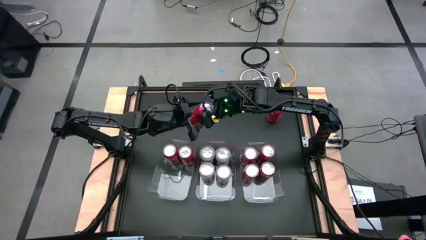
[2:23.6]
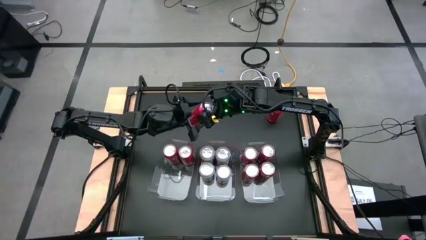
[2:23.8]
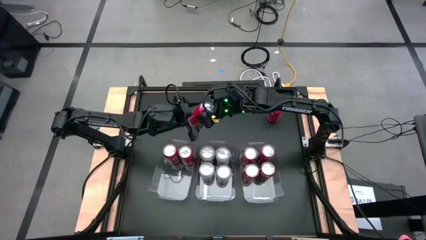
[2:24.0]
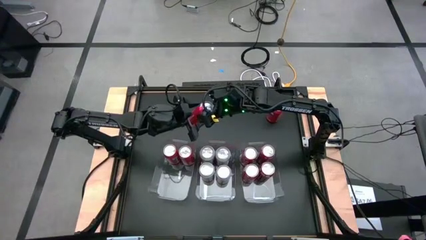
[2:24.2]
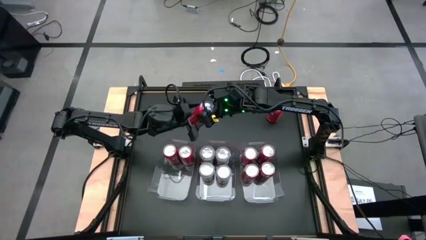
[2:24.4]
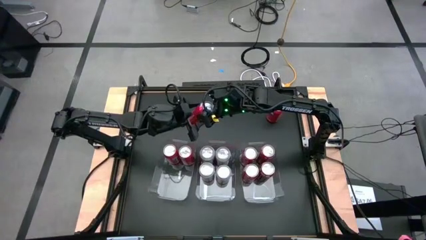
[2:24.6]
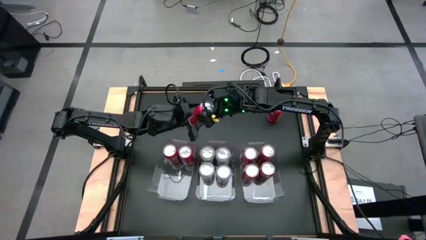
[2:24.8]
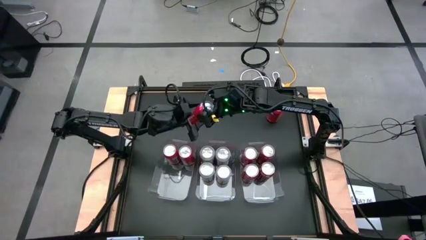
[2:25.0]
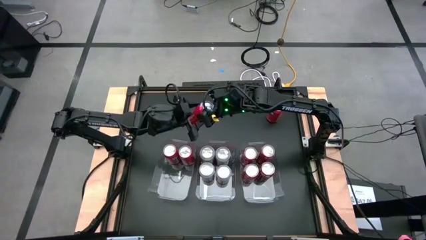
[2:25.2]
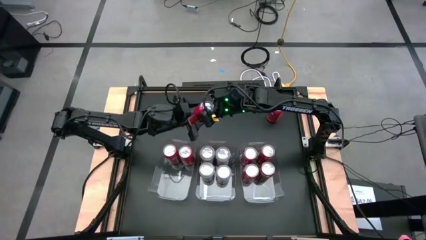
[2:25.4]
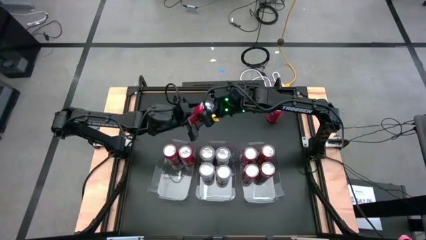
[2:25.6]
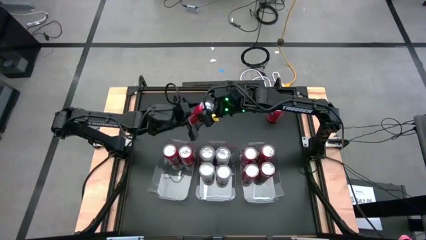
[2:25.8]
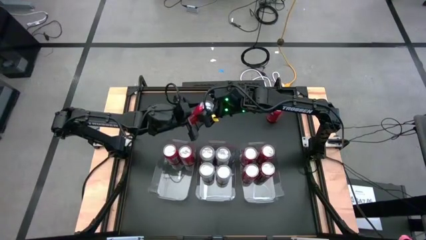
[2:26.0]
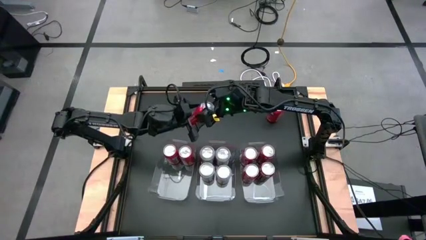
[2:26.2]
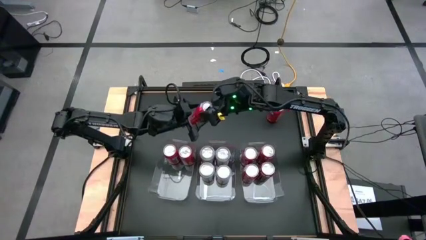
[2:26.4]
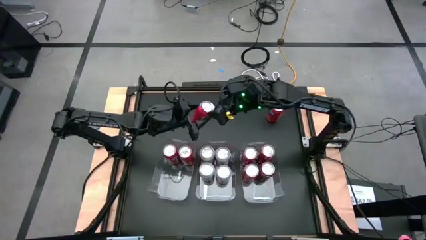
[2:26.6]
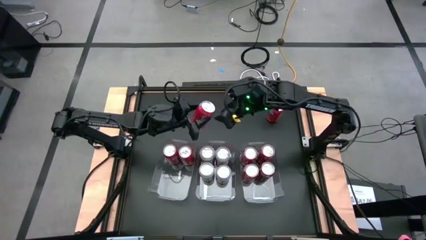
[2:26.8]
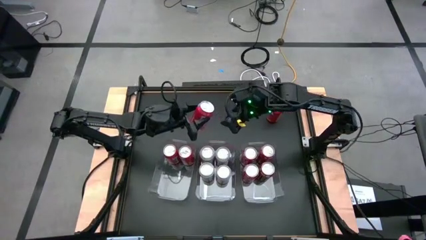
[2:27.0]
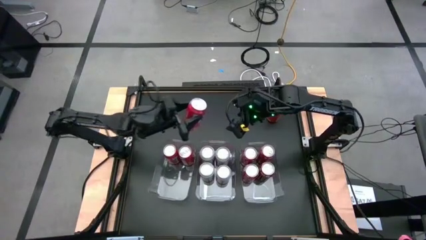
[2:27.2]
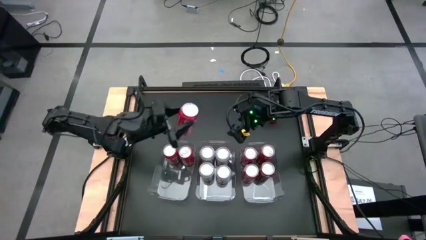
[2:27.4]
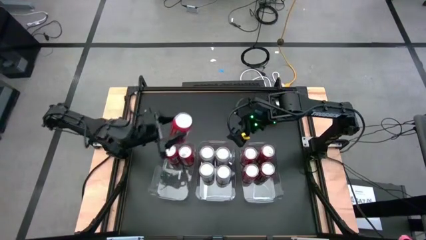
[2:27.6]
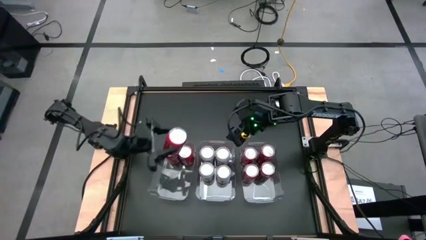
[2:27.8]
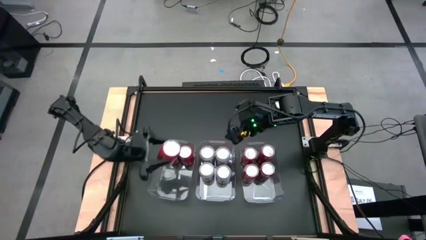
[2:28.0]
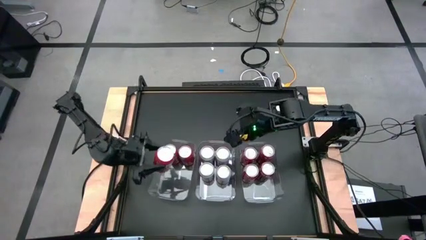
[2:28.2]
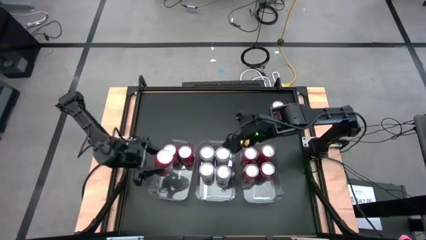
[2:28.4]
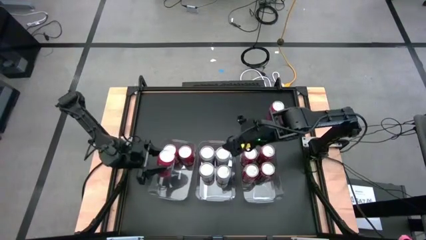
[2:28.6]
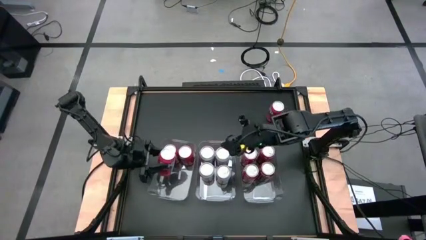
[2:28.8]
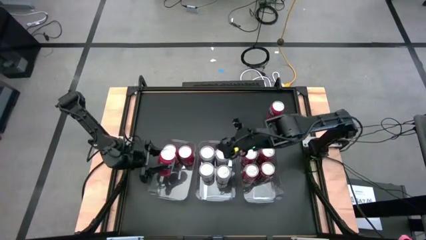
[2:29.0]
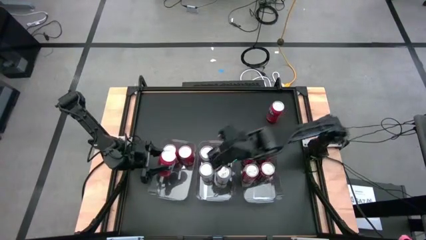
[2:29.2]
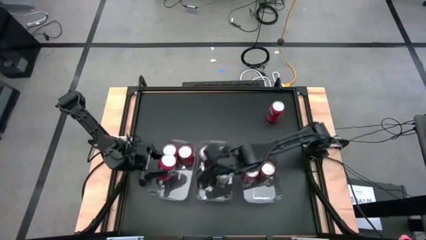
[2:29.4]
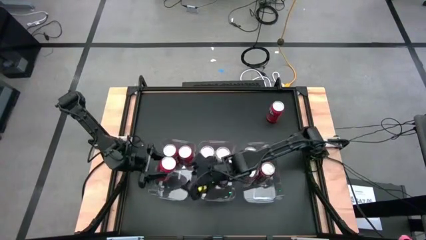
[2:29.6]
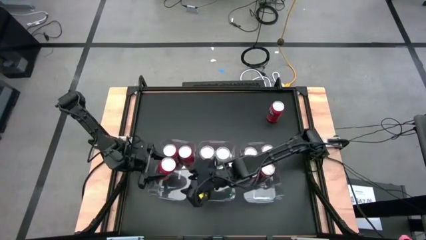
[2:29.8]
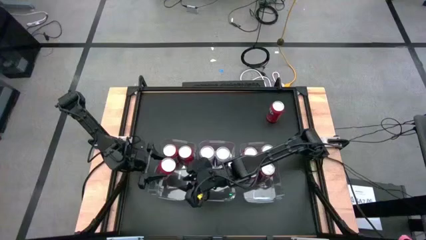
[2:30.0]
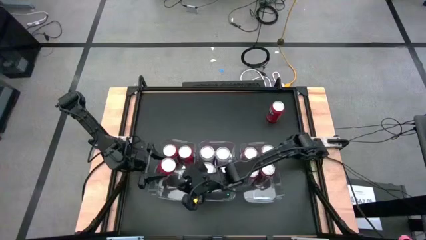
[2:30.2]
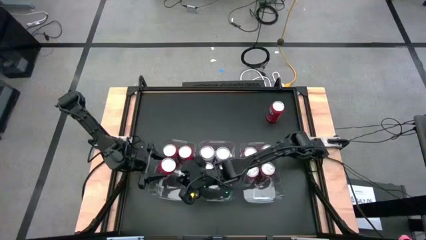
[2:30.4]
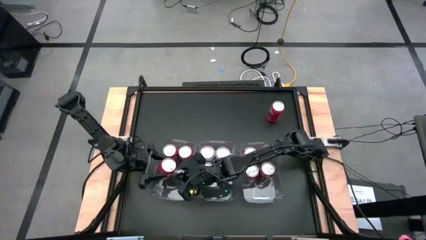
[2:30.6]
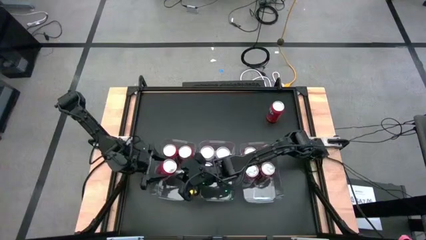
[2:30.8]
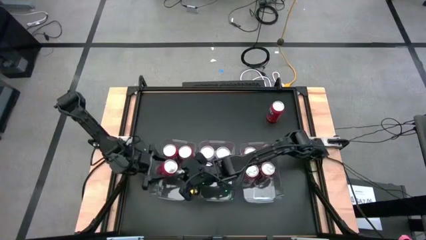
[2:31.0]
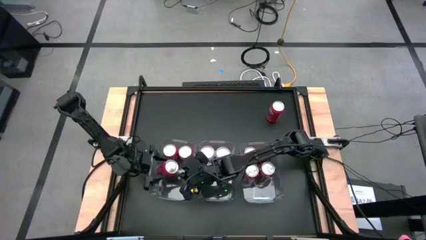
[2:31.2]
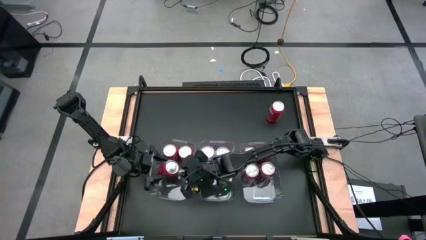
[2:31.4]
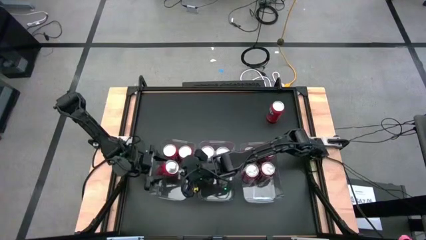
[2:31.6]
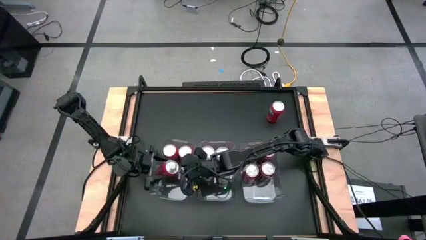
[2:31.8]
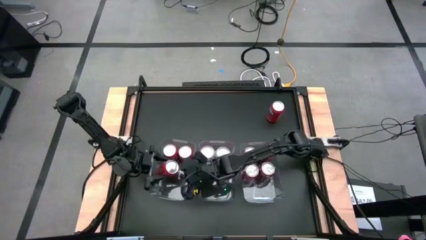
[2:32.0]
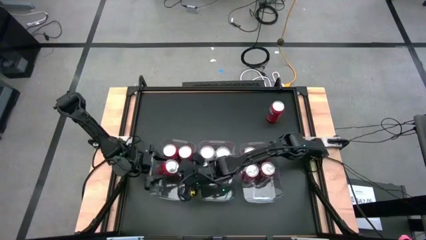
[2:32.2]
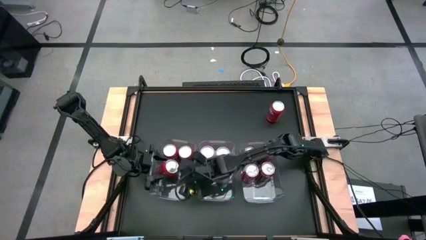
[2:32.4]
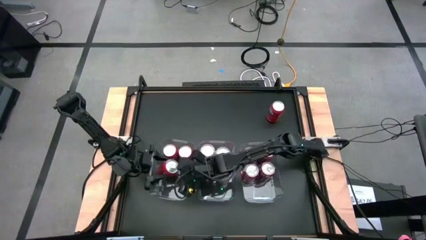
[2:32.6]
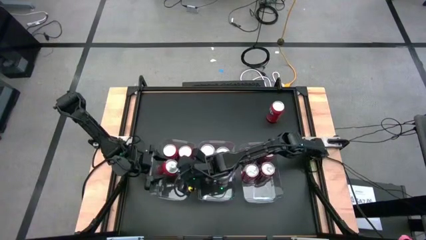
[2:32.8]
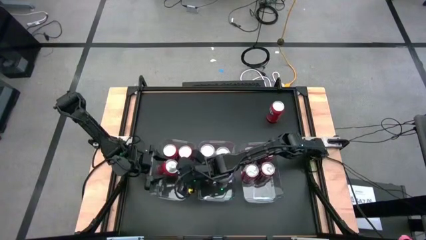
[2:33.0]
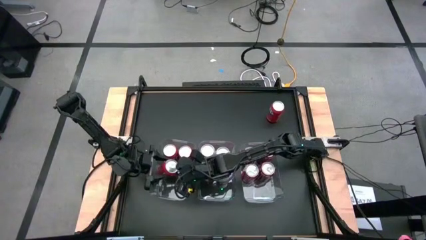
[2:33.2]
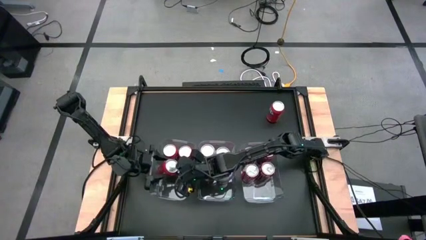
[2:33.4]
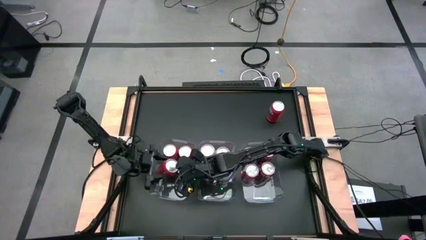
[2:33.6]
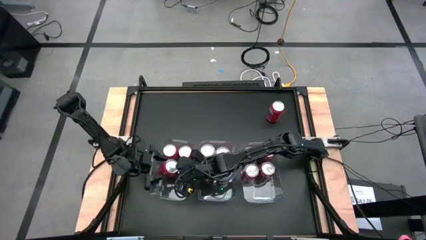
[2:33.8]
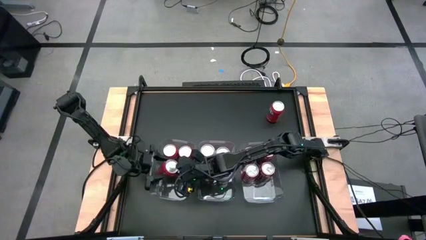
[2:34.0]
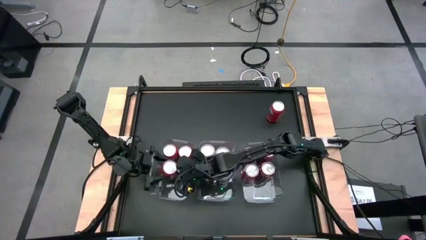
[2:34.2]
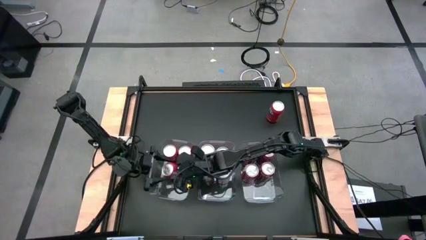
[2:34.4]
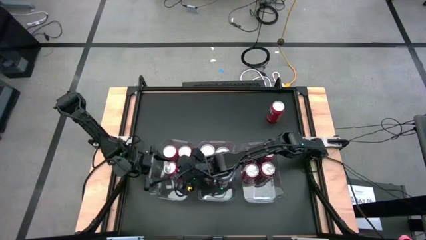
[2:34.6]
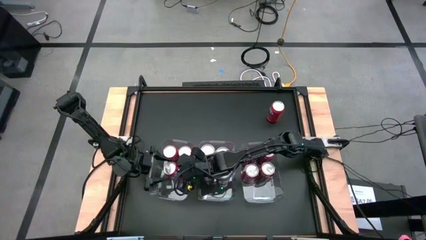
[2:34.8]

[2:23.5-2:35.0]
Task: Sort soda cans
Put the orange soda can into the left transparent bin

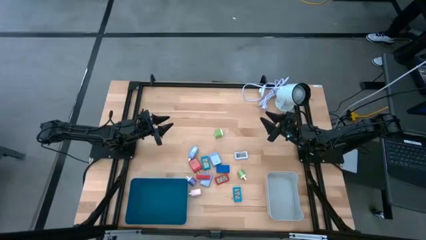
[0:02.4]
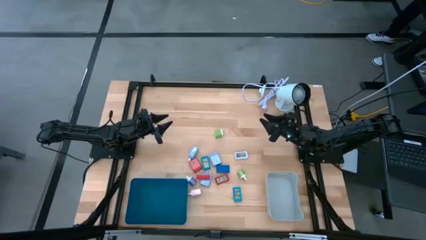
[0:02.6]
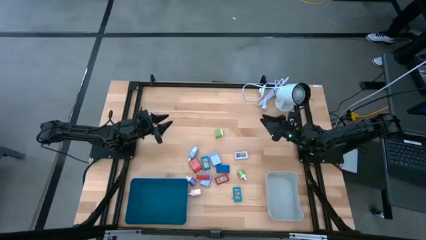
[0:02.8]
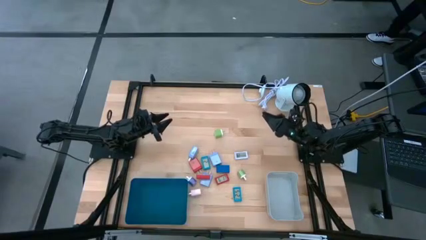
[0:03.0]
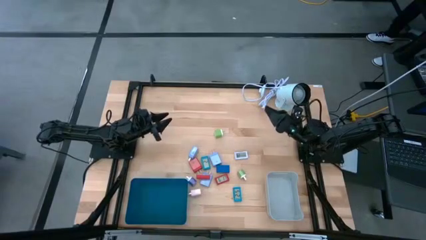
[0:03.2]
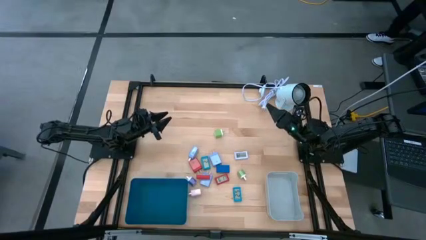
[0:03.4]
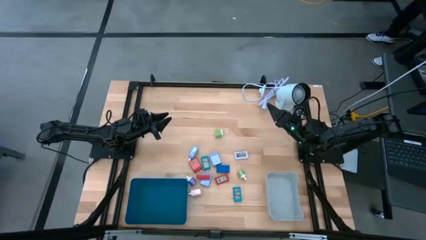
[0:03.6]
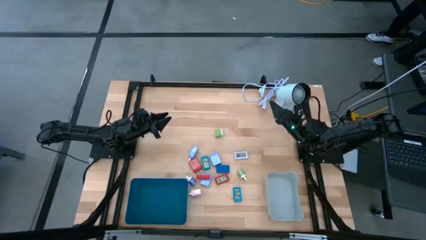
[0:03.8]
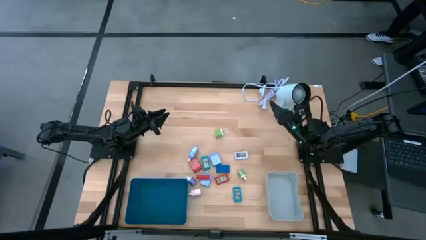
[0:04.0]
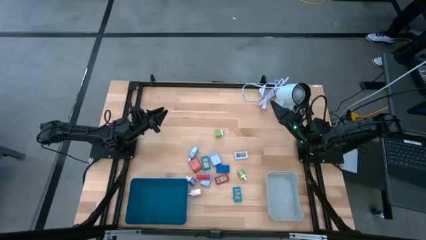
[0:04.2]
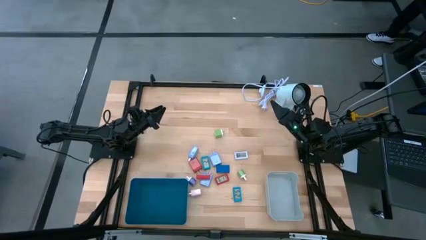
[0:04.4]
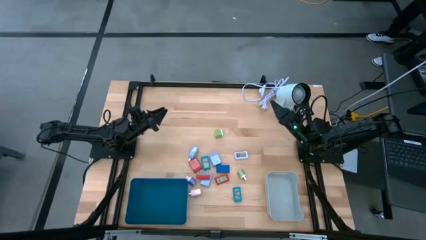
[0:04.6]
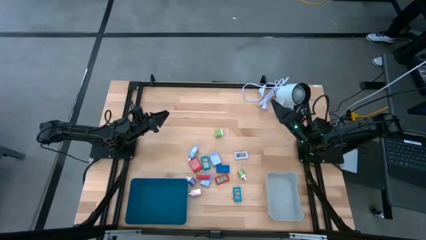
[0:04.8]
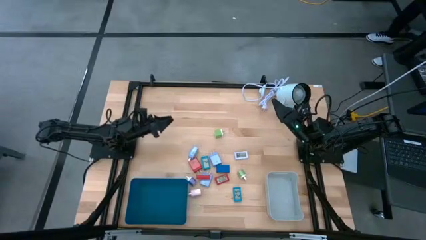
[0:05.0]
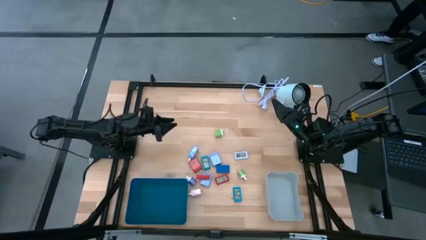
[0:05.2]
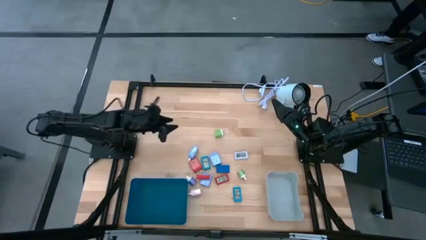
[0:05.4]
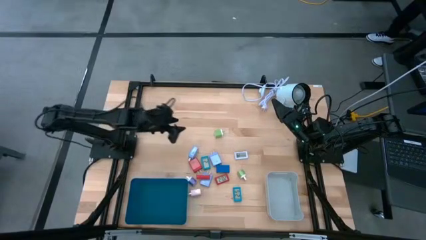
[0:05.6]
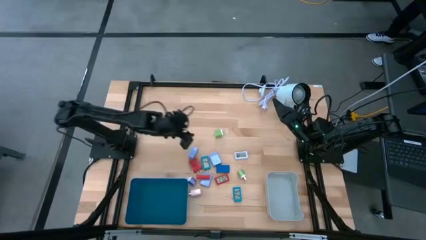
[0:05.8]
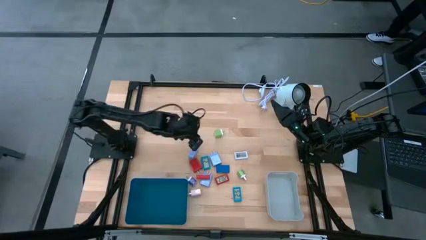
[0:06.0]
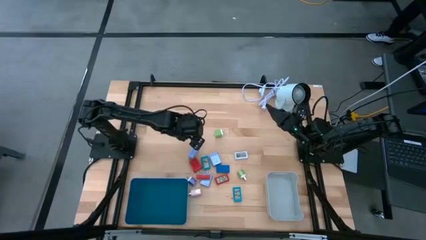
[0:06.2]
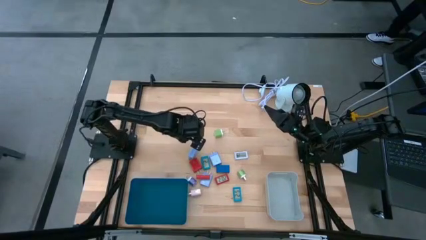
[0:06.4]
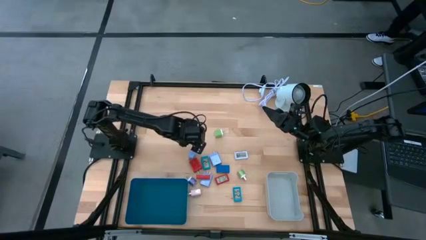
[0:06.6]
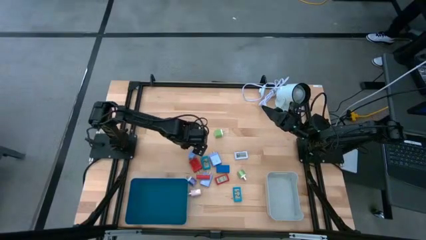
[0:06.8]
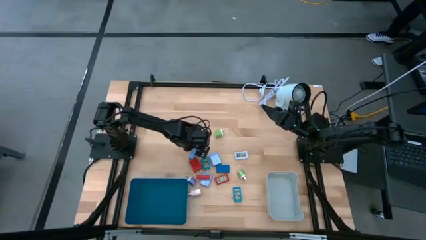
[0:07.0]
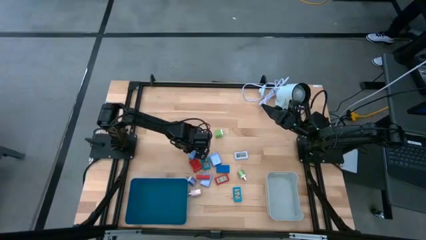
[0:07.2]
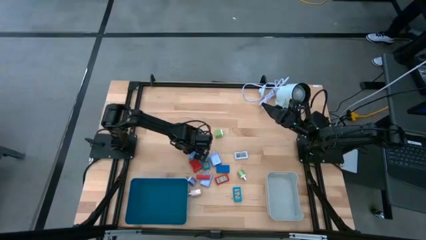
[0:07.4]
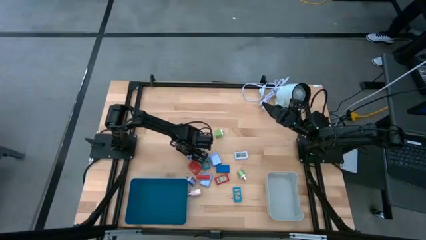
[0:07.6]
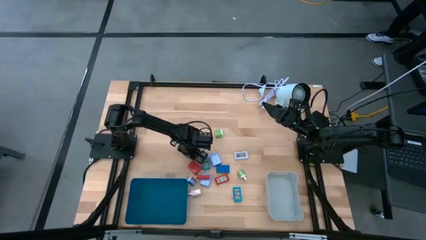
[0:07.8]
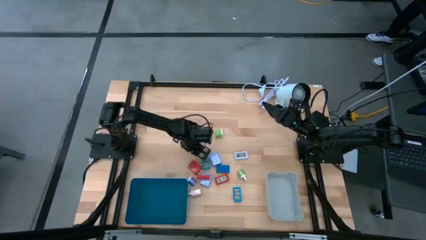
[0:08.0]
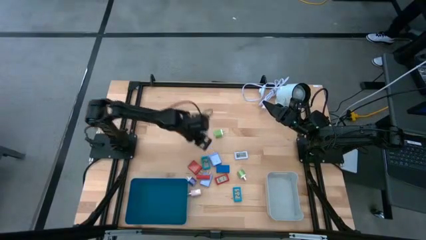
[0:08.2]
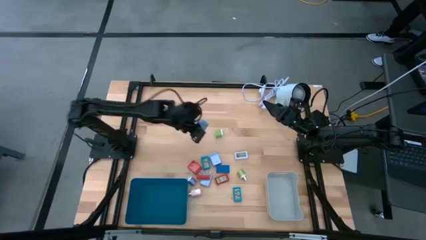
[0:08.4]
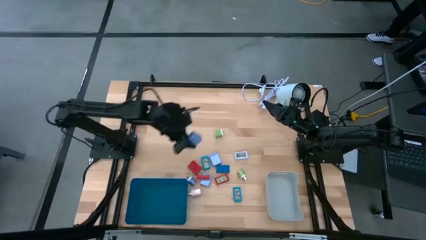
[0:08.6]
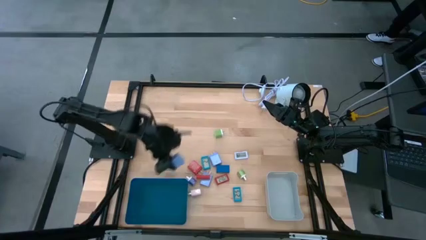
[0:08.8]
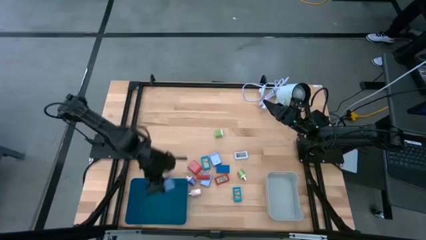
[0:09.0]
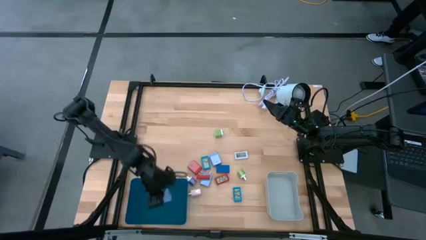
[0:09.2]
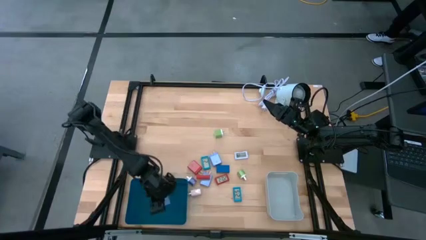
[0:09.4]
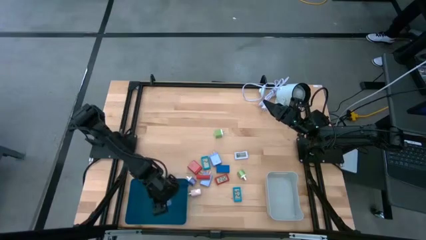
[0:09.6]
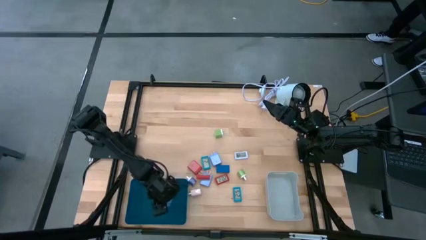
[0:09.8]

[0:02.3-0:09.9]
Task: Pick & Place Office items
Put the left purple charger adapter into the blue bin
